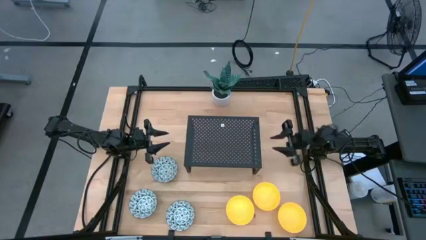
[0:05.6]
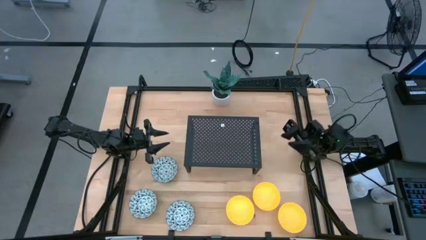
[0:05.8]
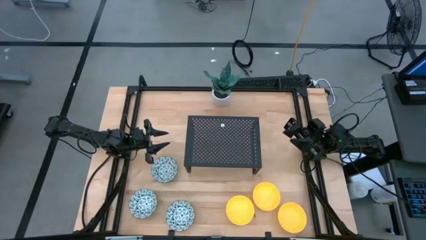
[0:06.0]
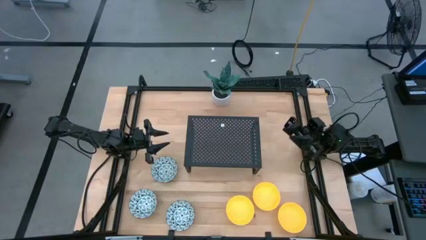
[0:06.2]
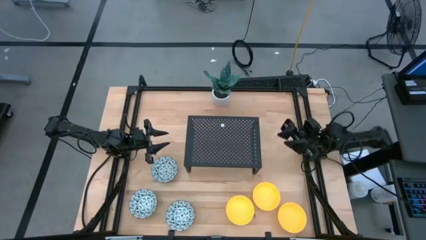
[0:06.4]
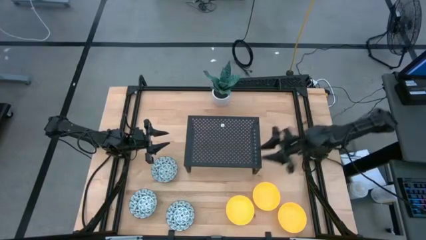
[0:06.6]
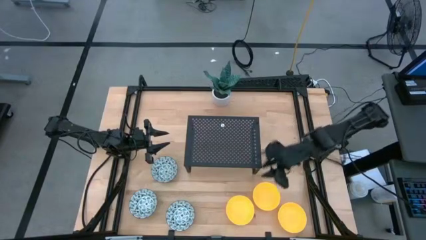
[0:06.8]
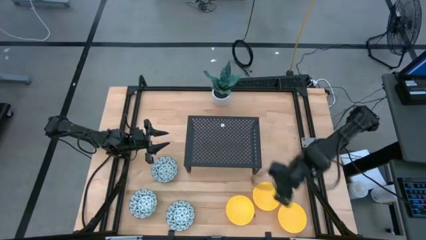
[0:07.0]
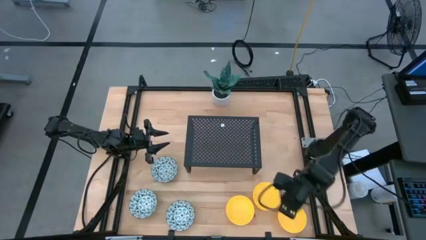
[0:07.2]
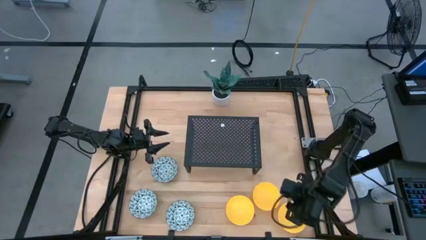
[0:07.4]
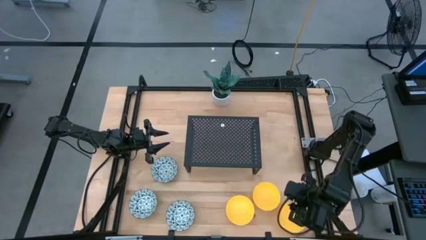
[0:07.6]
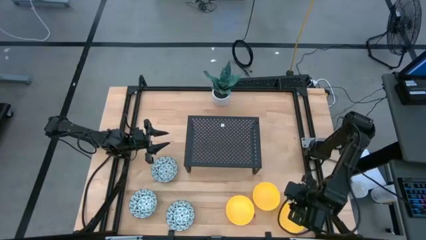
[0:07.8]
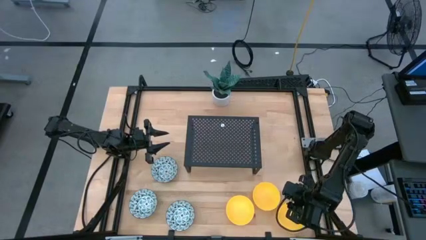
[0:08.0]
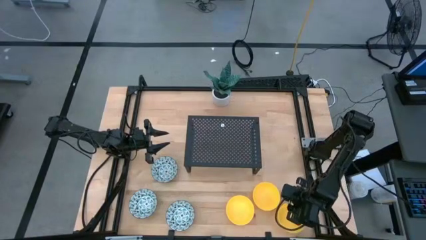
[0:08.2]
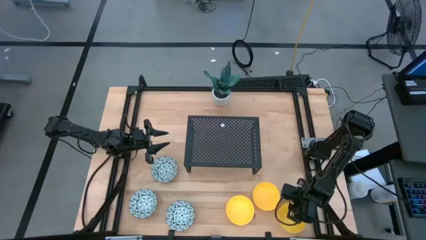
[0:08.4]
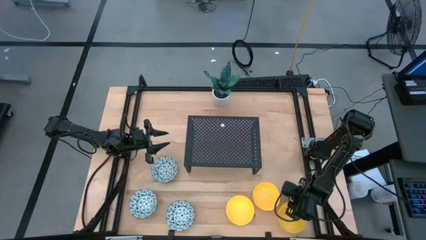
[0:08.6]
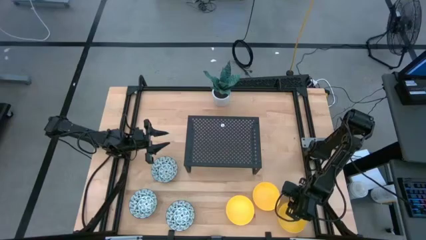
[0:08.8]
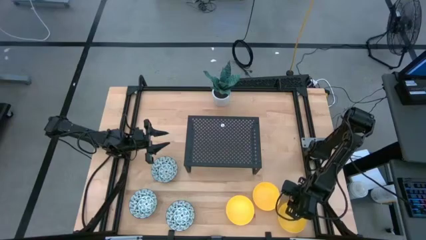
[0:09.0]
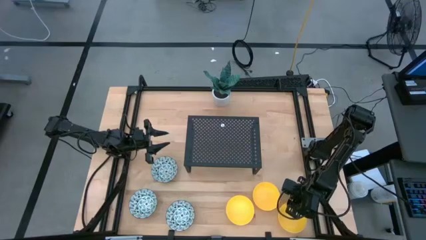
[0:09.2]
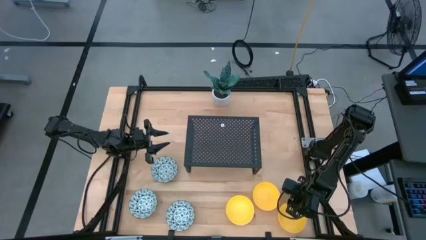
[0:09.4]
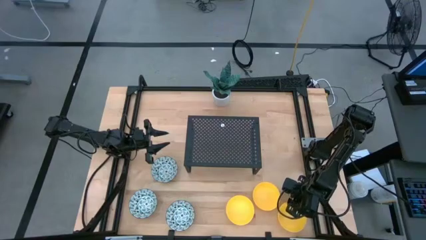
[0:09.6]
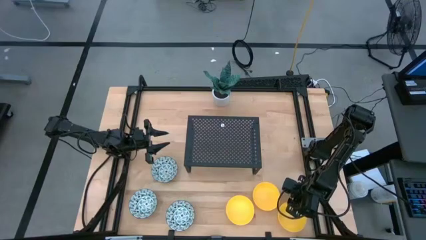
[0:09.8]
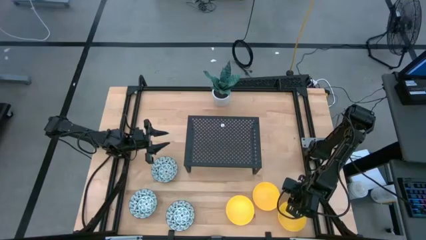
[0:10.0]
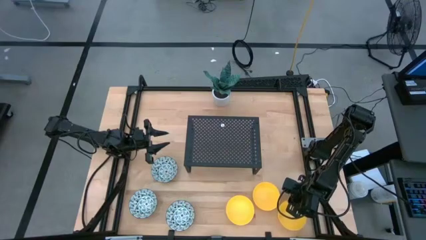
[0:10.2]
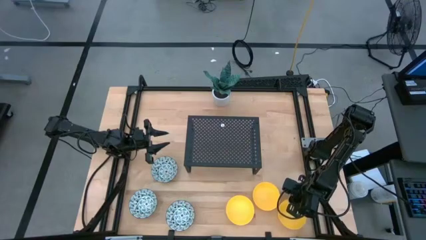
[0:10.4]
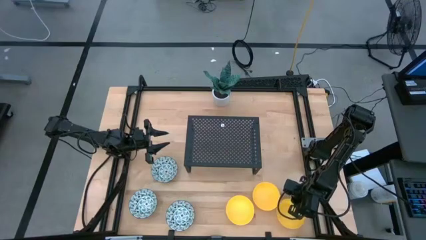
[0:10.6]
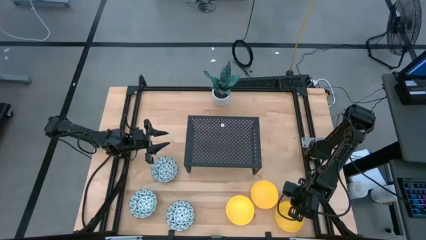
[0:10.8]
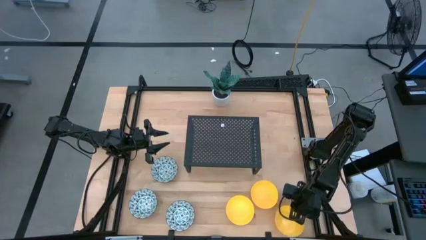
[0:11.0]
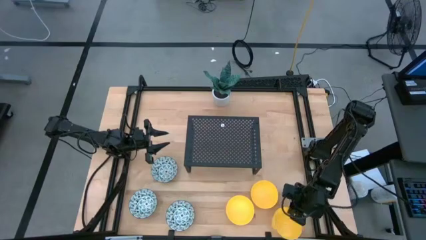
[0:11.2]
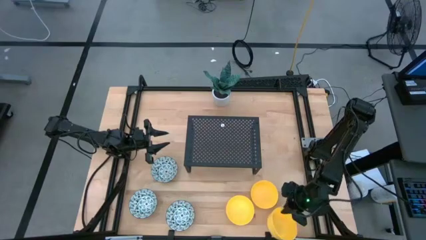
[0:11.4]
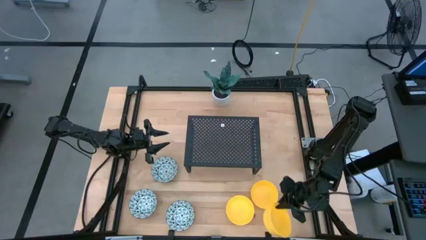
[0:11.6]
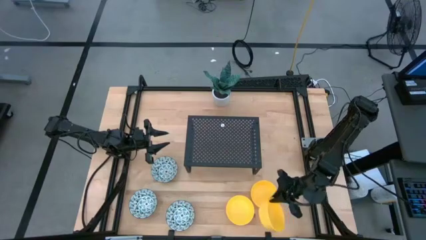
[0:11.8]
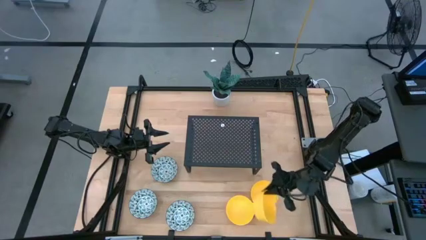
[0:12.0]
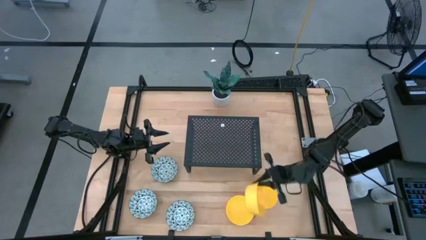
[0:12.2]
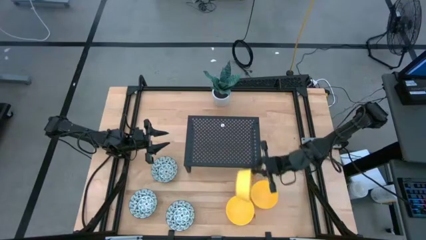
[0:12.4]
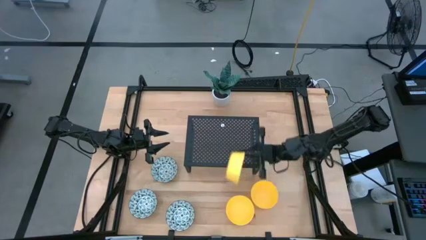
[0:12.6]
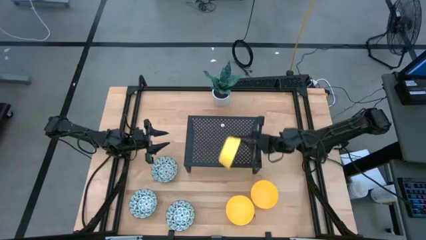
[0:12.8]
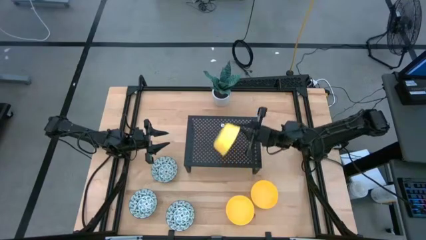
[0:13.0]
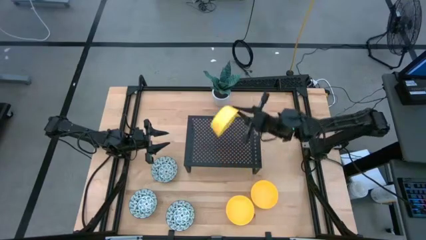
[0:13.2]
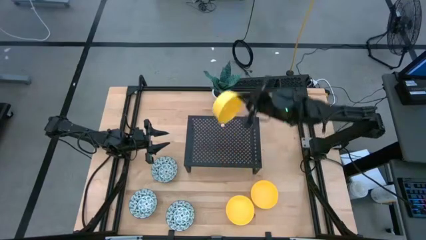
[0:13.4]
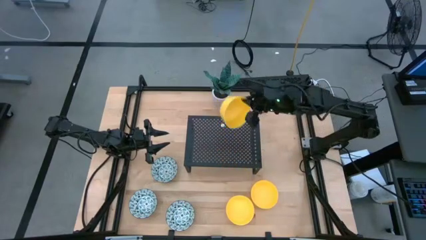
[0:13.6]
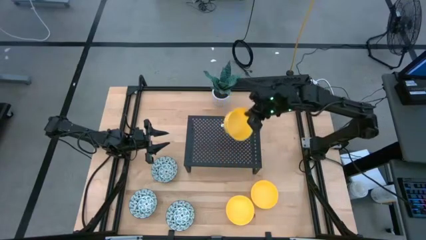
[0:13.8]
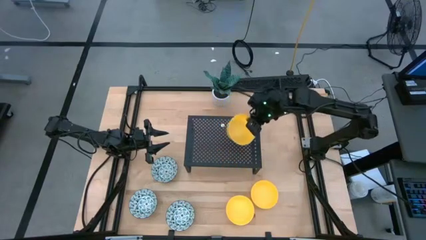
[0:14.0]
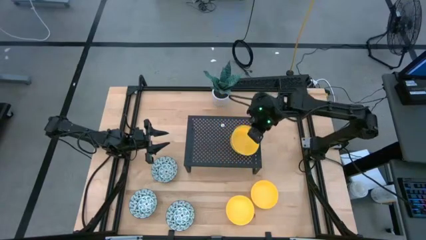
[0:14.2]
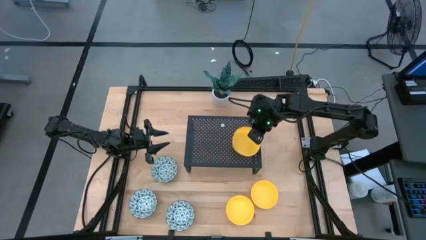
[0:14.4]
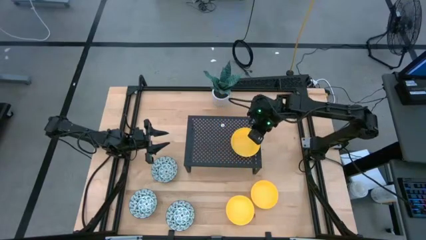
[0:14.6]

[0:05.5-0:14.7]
Task: Pick & Place Mini bowls
Put the bottom right yellow bowl on the shelf

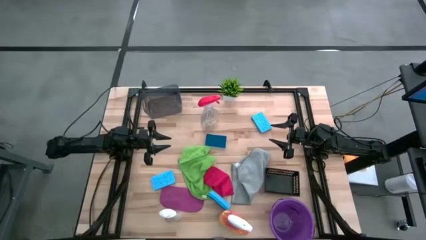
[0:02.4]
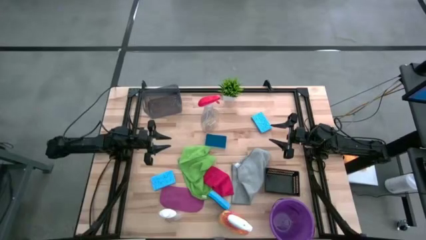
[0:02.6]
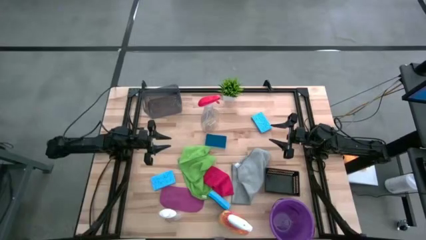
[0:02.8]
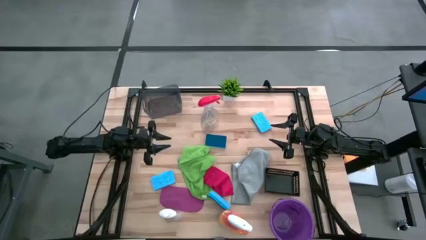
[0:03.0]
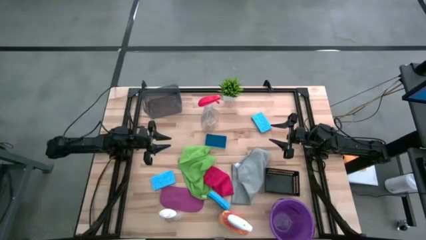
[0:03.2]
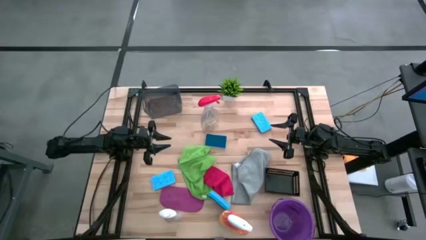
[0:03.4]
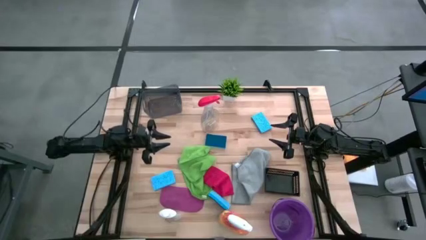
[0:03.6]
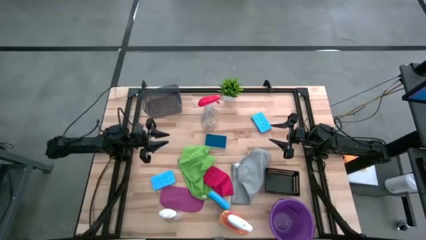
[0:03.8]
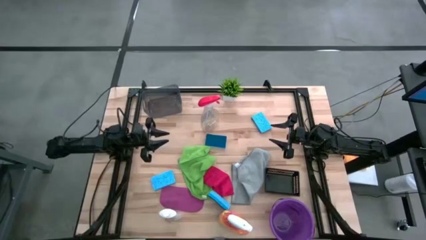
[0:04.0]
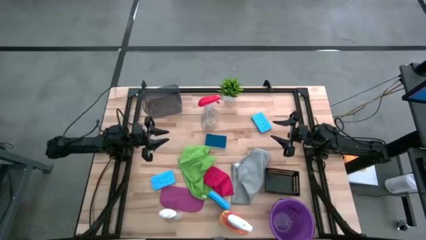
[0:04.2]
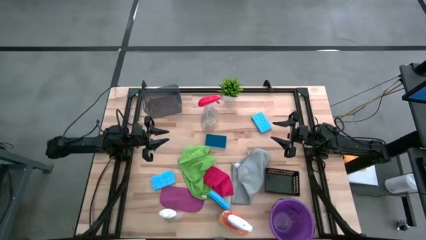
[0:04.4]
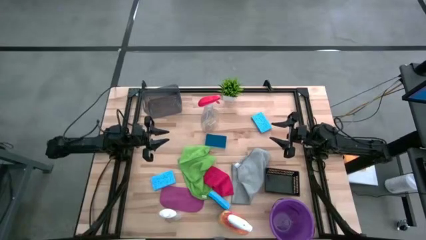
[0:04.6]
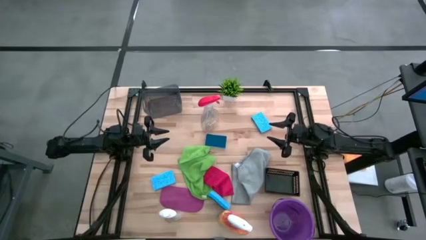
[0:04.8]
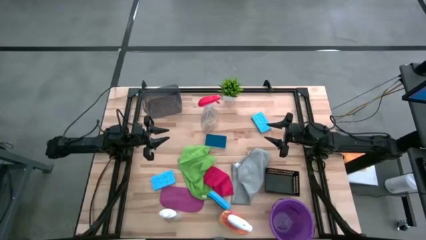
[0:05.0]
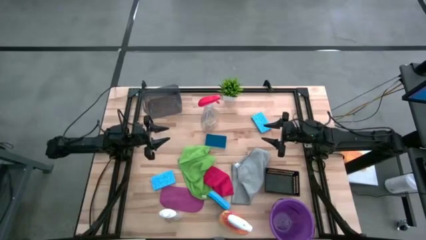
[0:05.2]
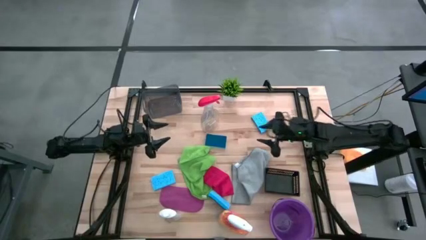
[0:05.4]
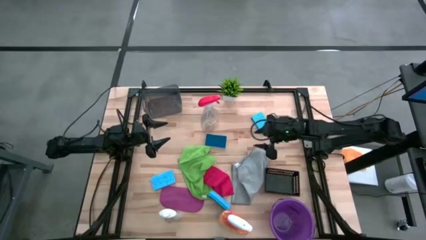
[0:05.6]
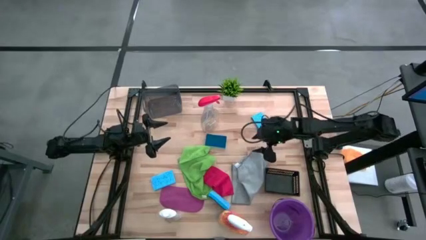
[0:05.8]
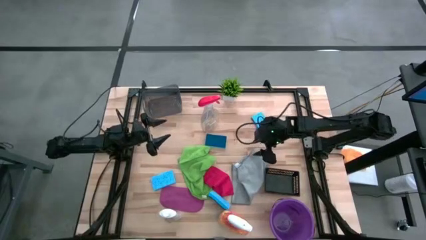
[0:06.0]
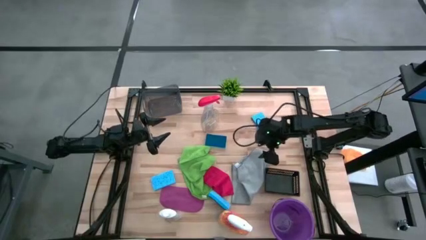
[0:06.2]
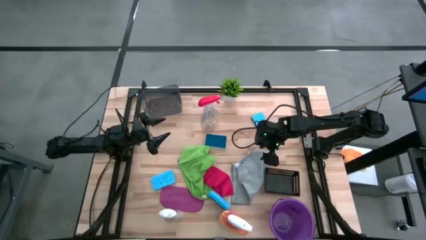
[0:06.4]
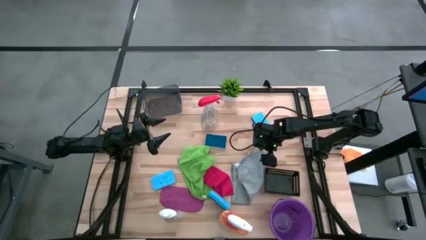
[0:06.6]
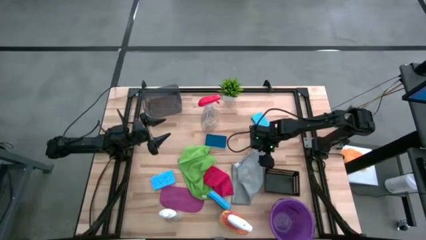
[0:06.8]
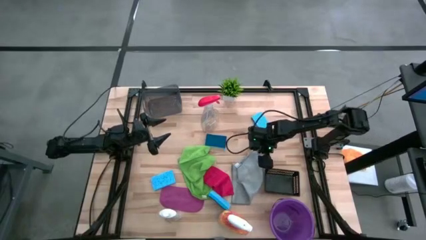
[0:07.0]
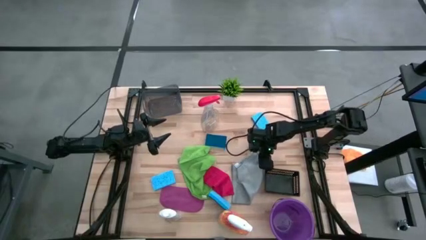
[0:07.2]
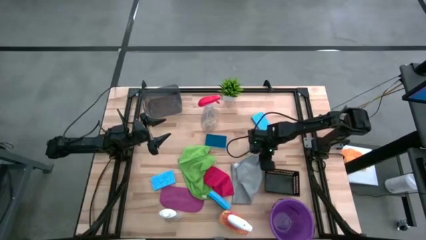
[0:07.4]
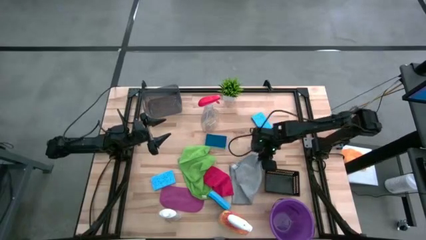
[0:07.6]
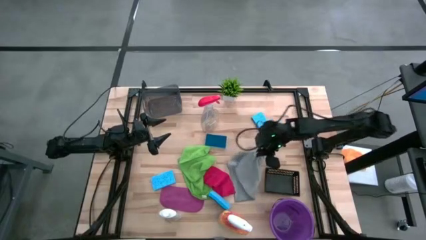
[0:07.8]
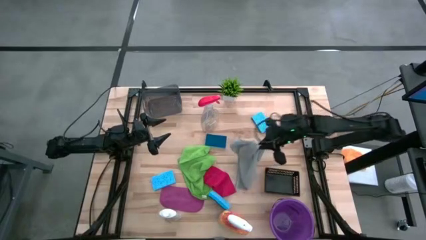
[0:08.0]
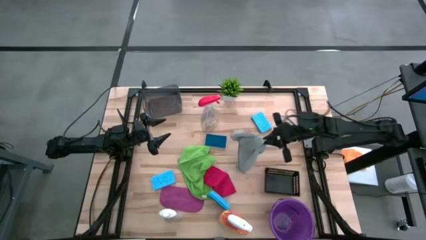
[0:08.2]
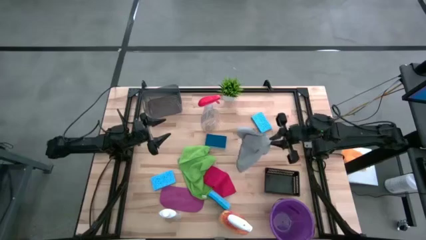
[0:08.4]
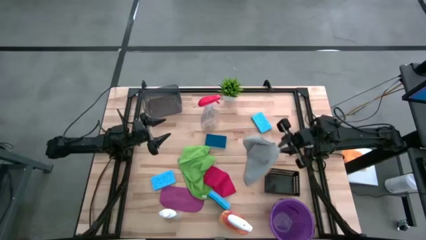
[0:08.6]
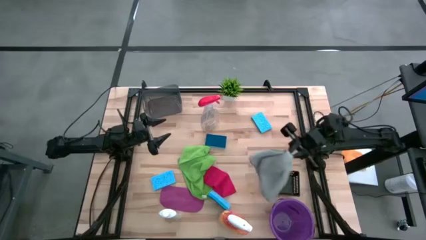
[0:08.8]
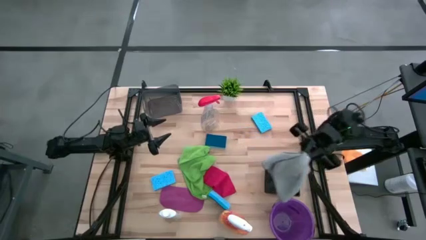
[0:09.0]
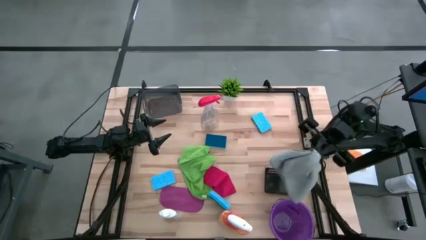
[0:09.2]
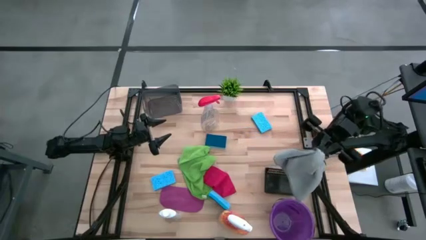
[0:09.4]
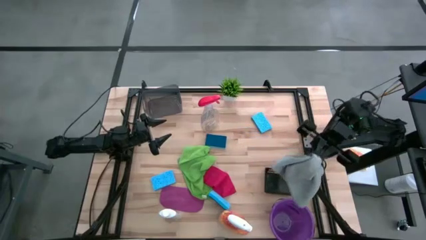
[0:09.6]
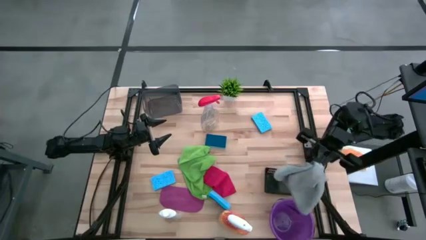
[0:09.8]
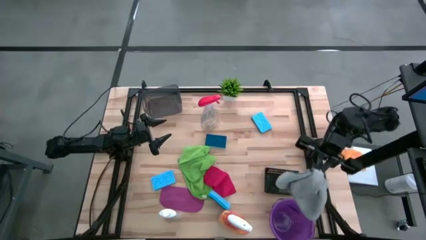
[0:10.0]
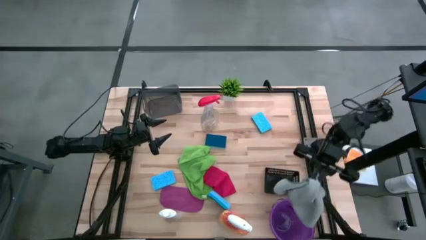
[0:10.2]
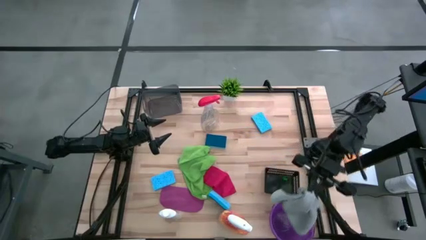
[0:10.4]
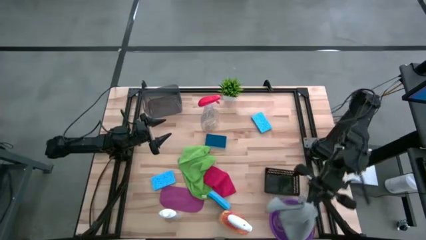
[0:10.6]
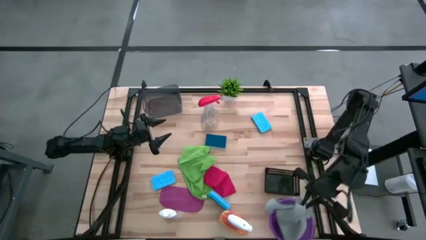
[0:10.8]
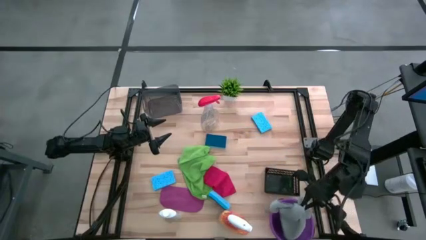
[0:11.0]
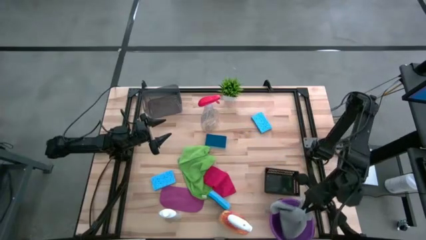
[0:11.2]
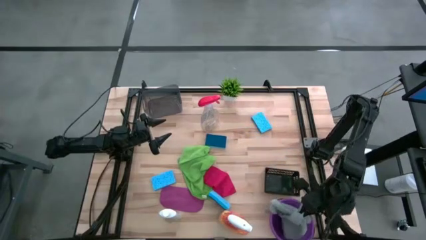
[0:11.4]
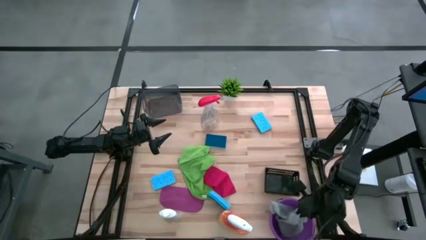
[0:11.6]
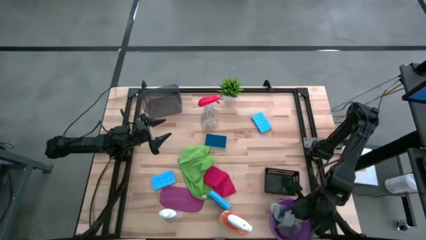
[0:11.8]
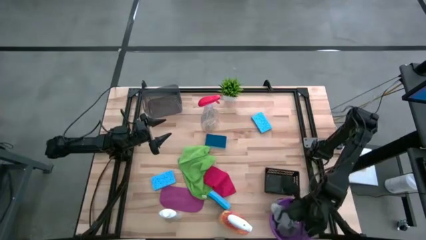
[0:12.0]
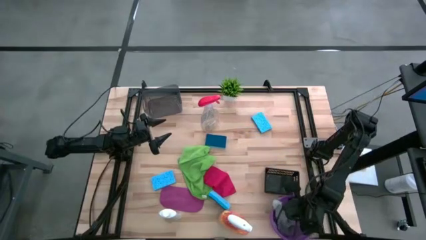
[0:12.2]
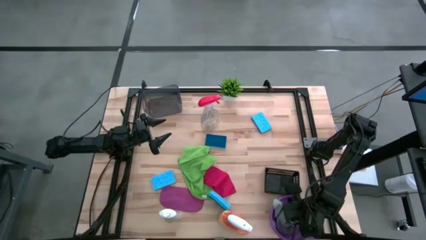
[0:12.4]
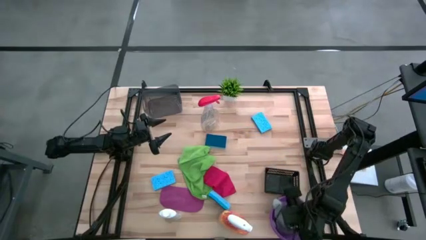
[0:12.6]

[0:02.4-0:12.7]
Task: Pick & Place Kitchen Items
Put the gray towel into the purple bucket
